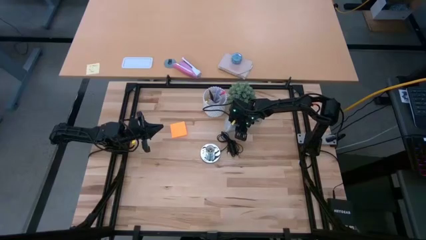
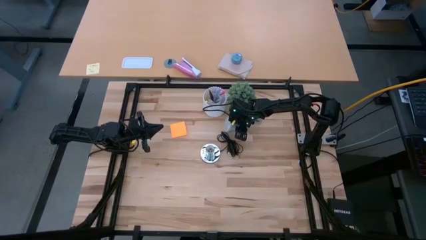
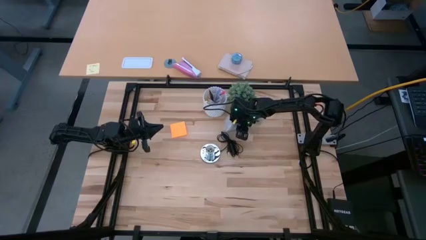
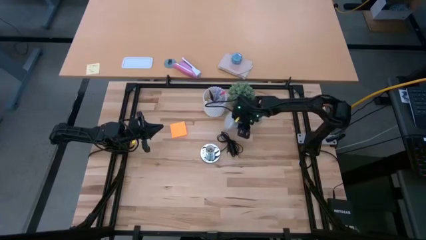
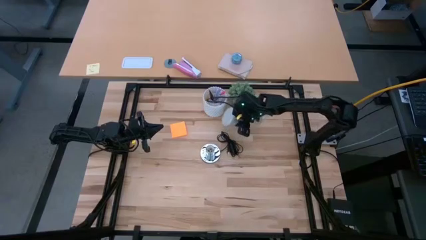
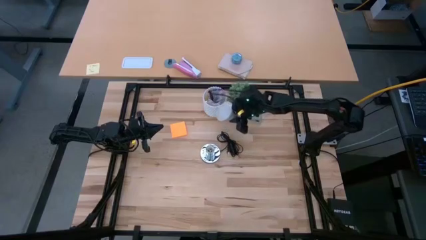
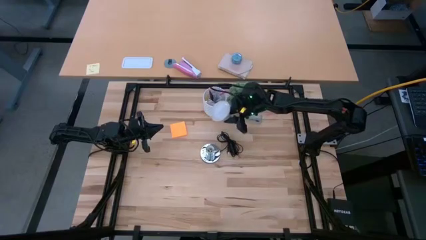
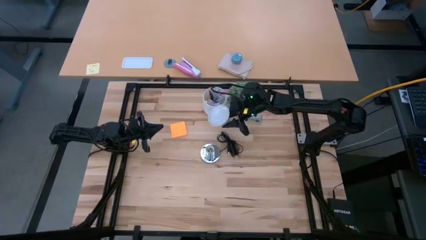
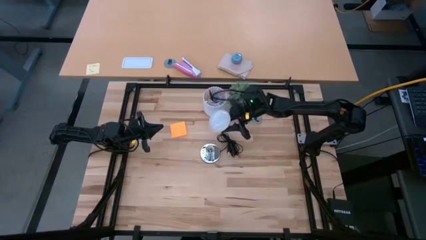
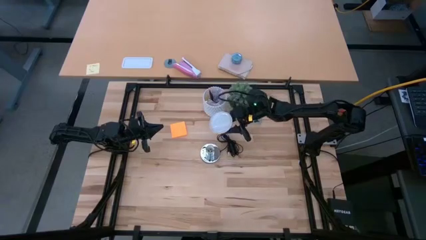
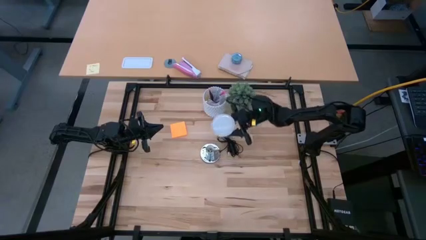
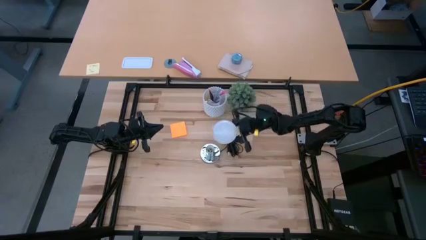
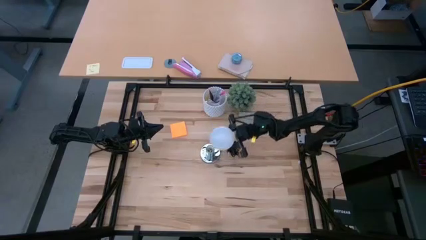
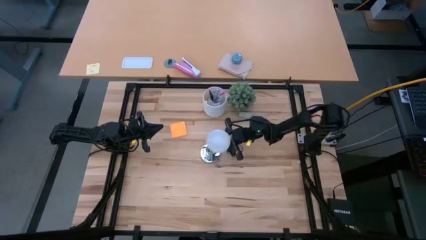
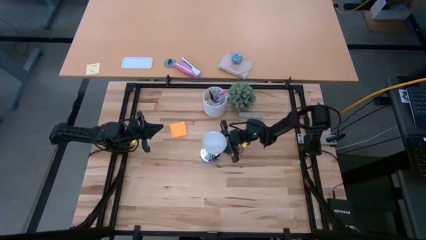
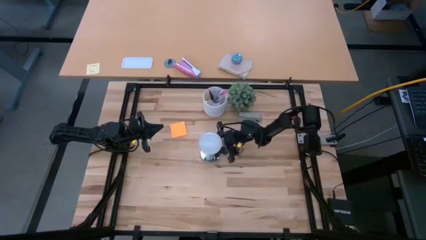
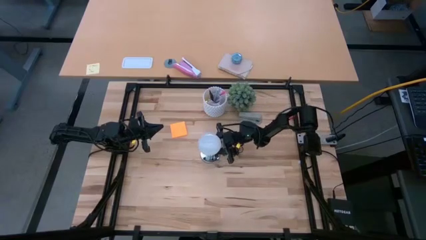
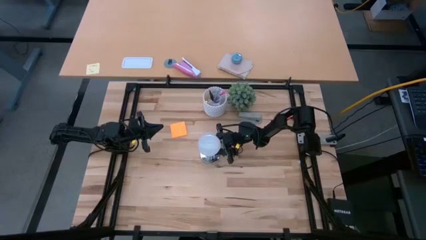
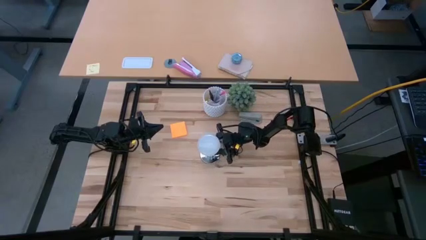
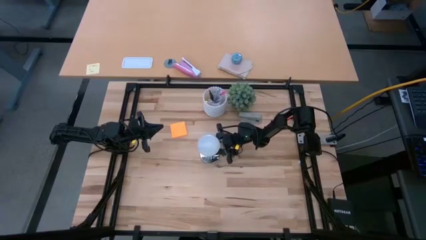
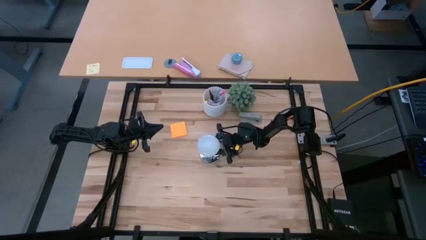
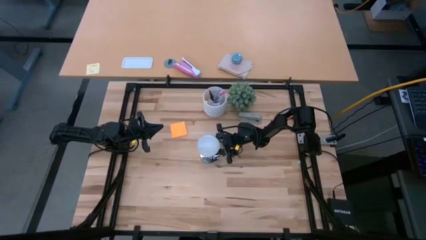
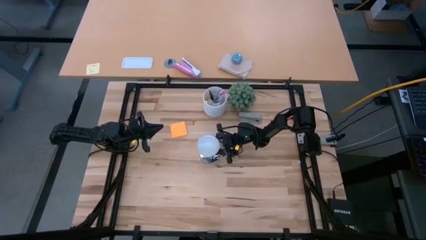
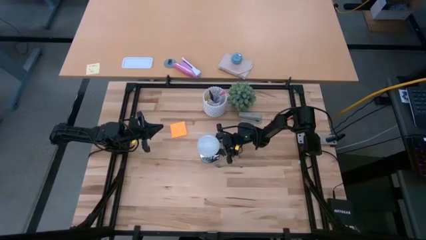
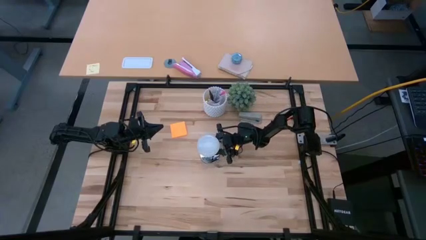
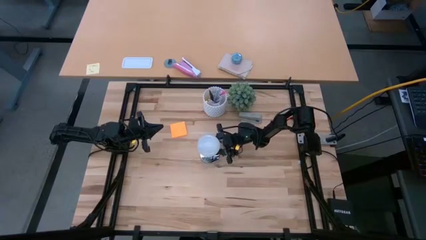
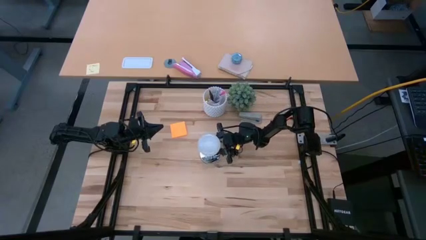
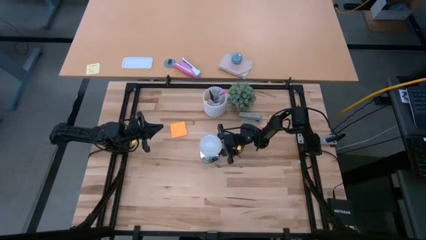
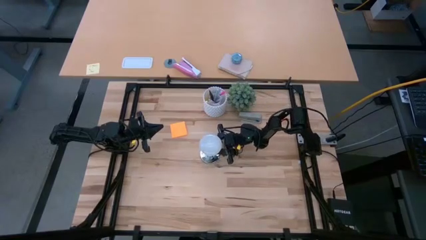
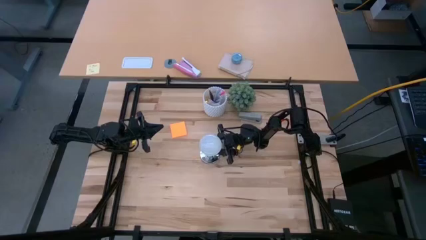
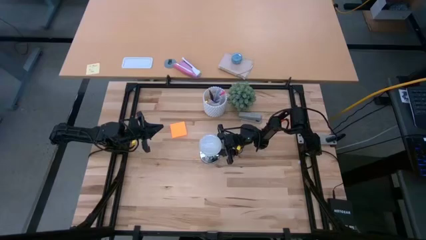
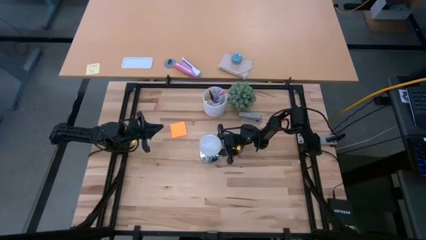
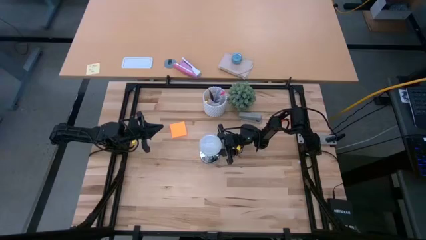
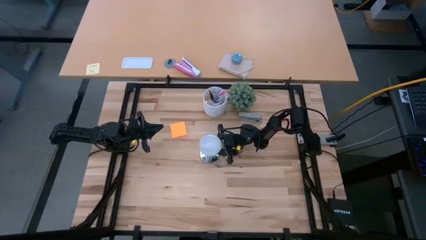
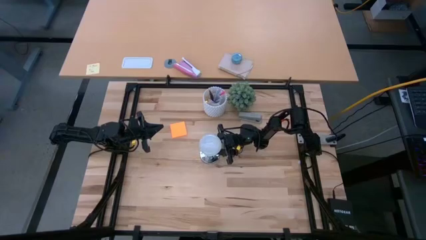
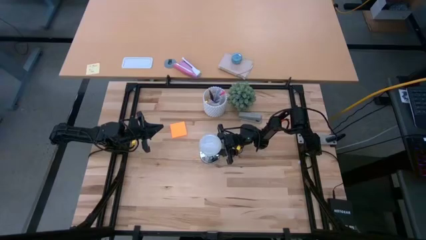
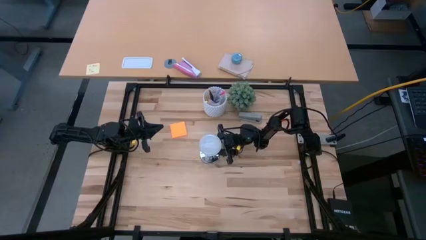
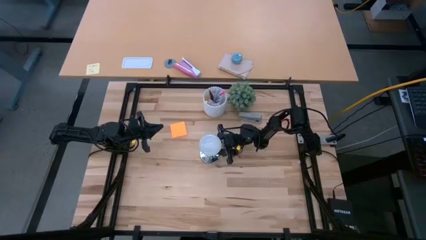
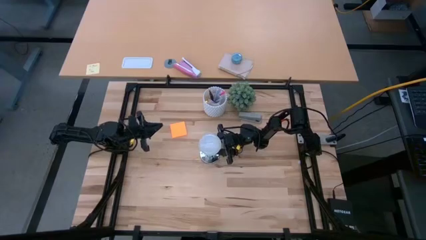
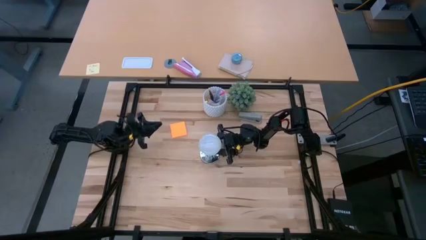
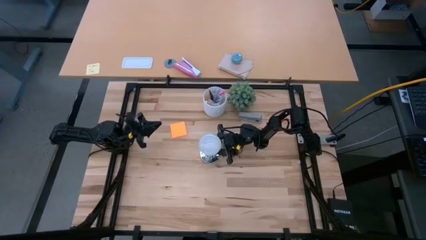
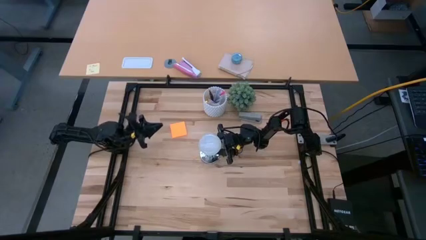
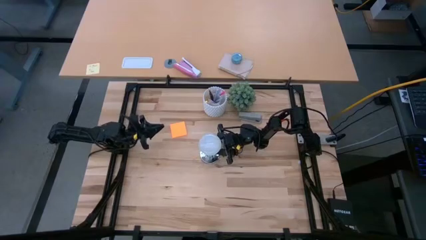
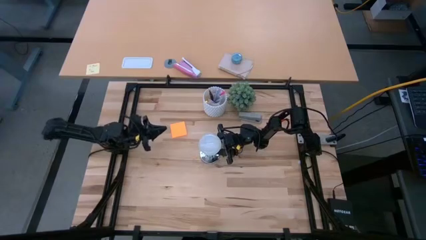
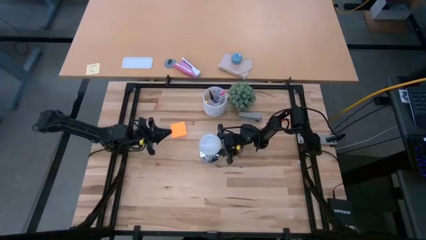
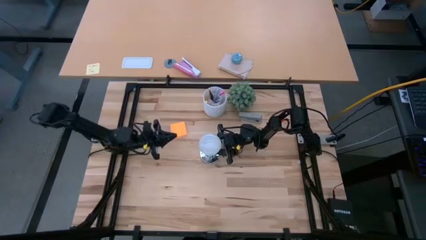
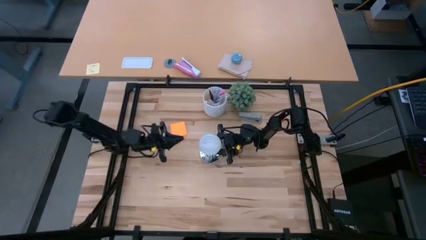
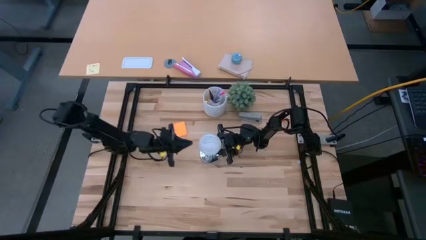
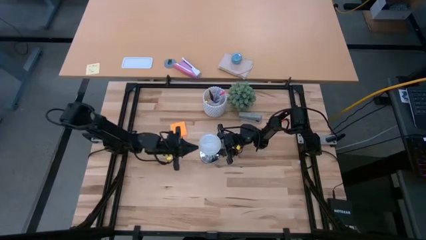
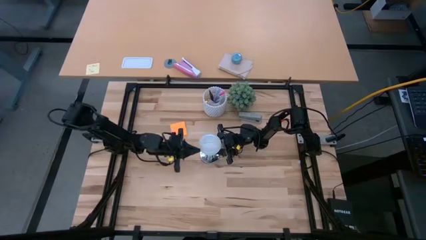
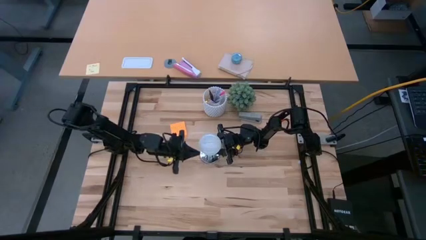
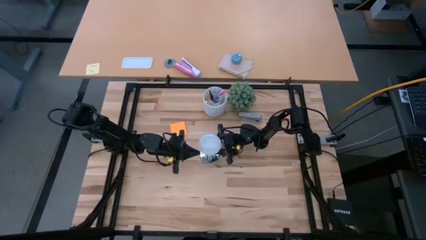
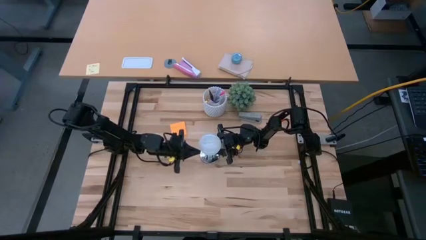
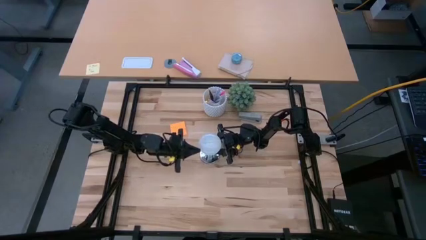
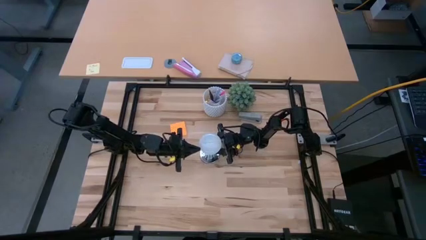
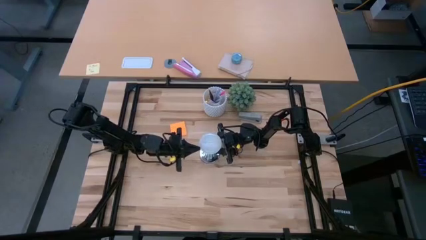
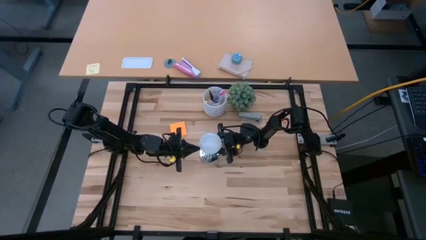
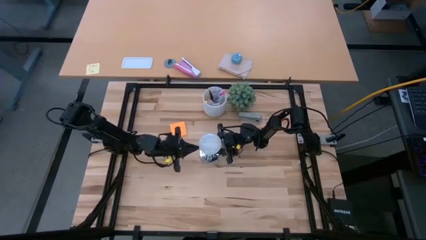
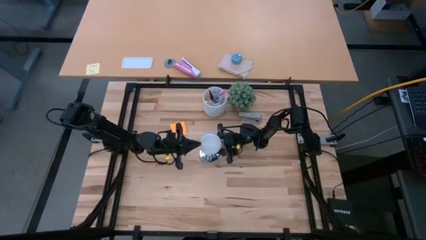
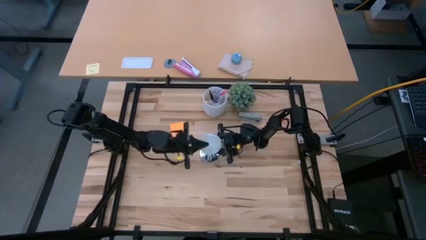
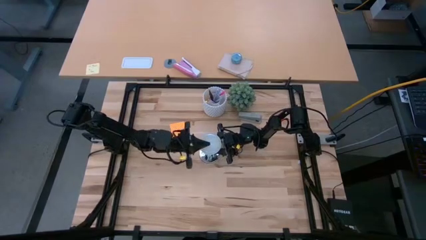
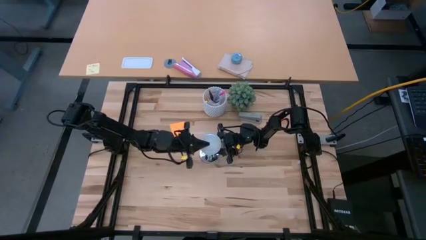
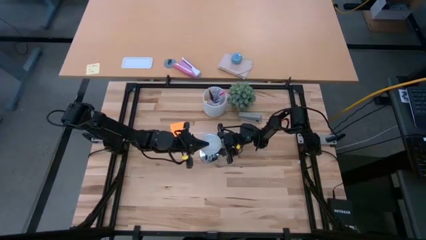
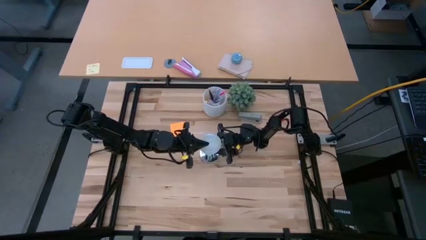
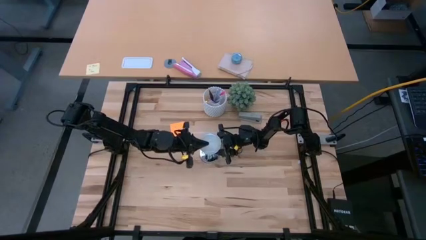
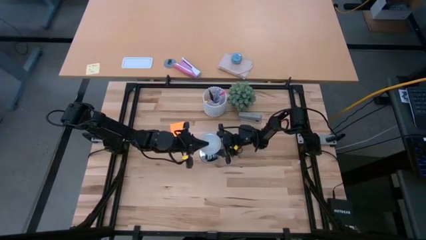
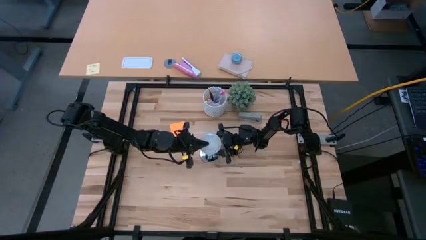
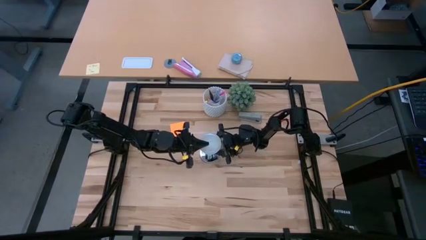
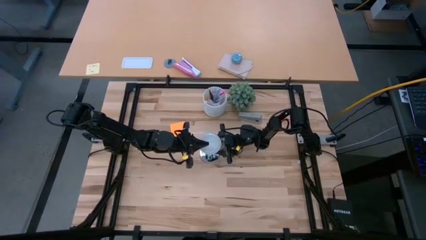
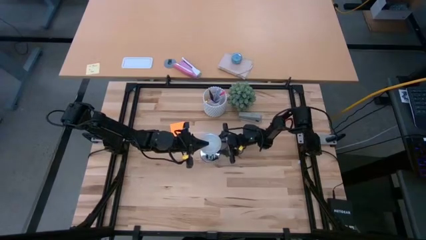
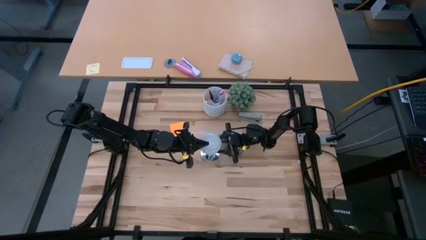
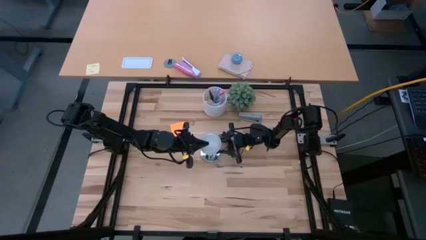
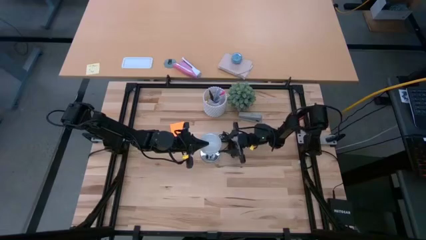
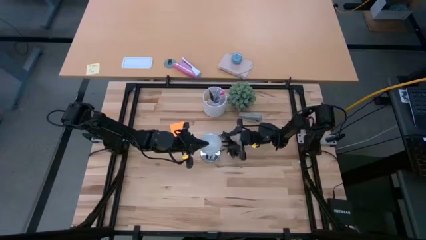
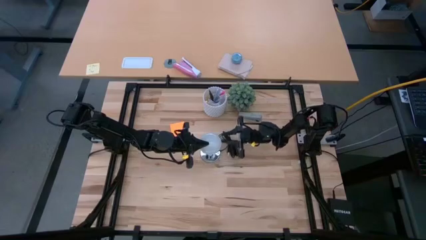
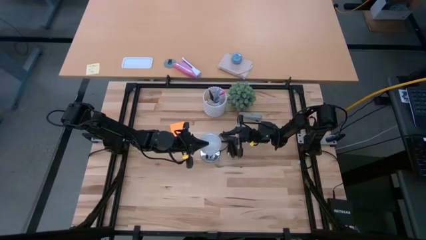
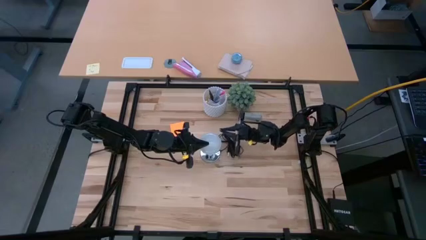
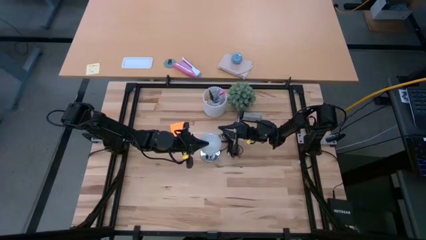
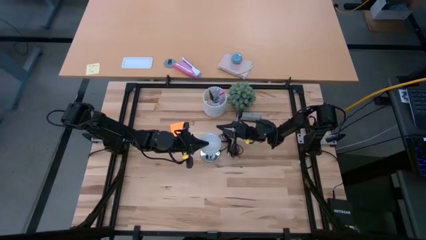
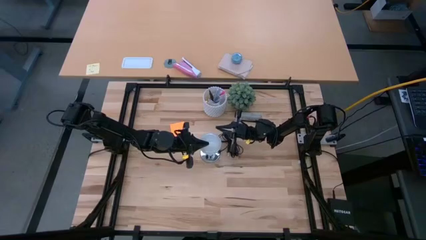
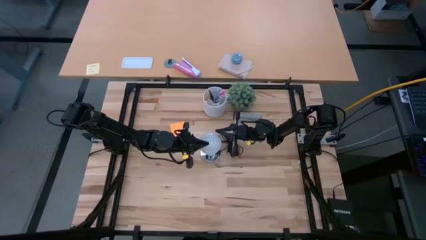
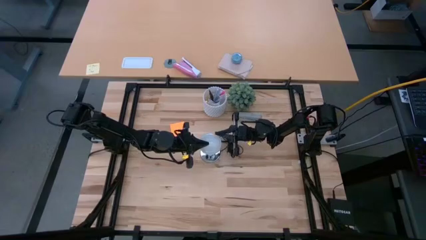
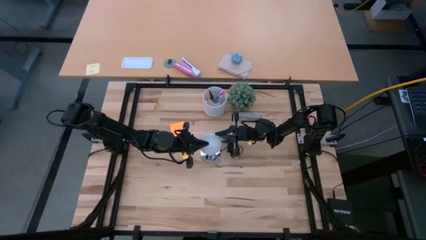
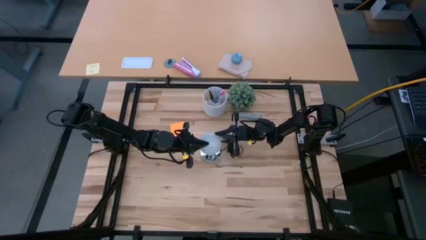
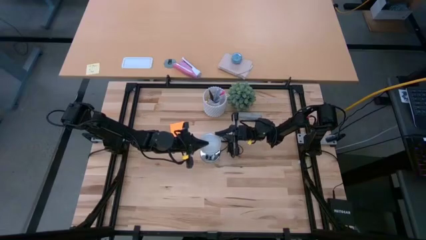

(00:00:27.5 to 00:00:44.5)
Task: Screw lightbulb
Insert the light bulb into the lamp socket
